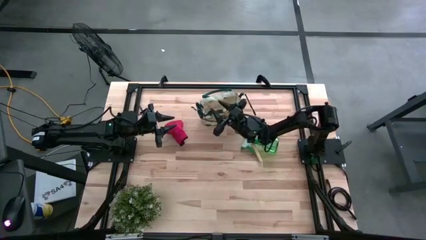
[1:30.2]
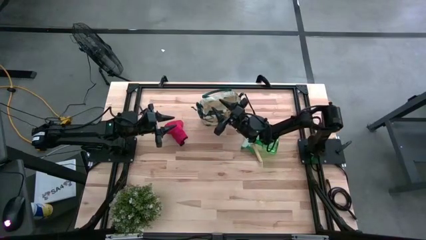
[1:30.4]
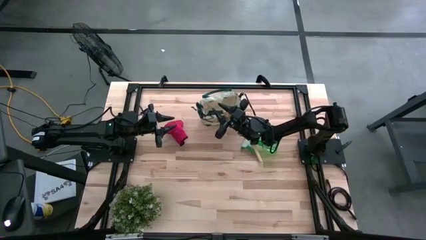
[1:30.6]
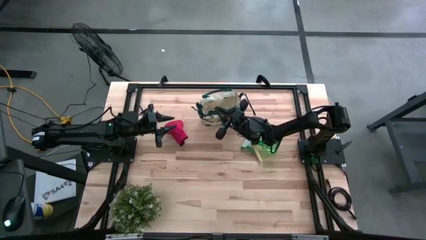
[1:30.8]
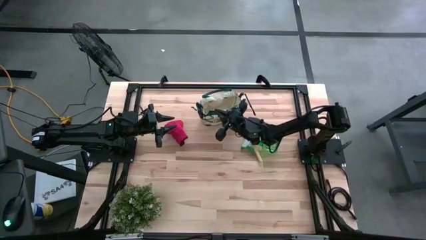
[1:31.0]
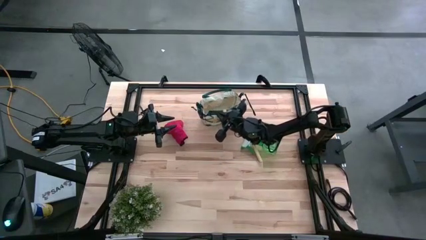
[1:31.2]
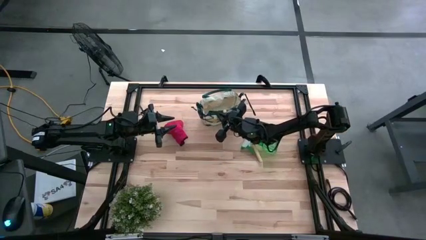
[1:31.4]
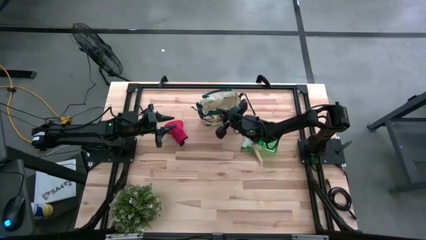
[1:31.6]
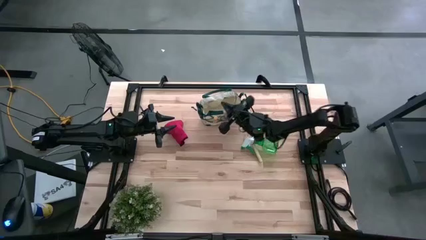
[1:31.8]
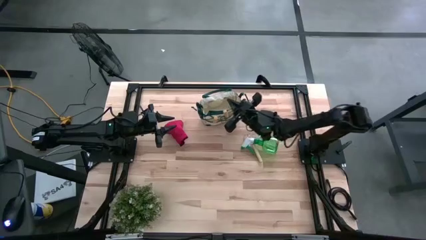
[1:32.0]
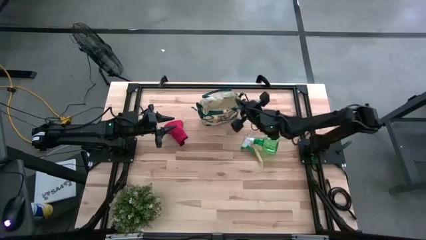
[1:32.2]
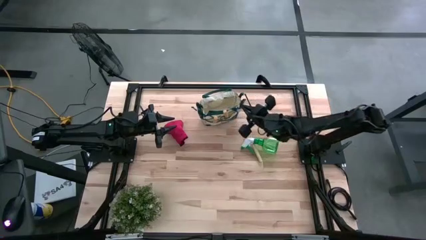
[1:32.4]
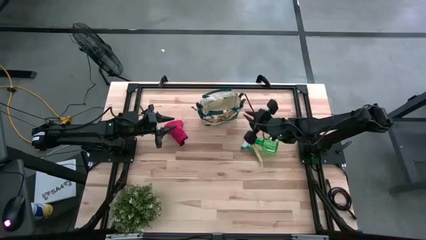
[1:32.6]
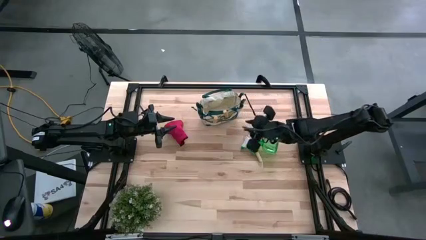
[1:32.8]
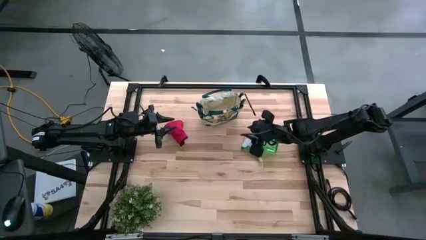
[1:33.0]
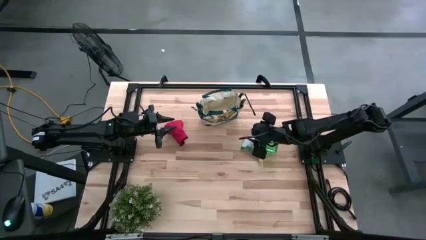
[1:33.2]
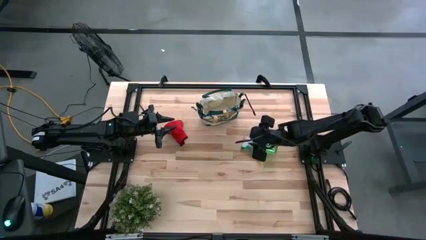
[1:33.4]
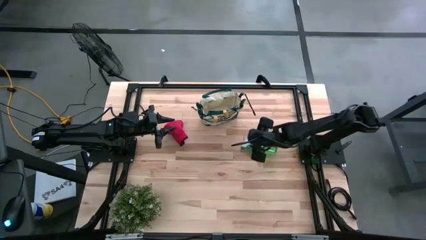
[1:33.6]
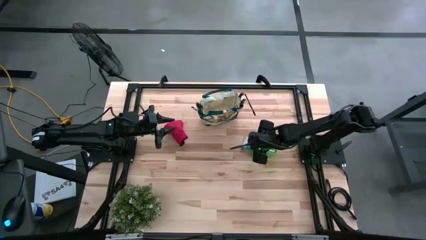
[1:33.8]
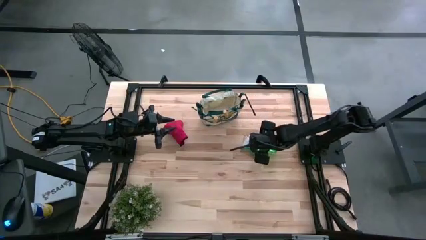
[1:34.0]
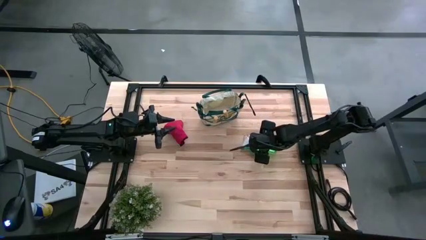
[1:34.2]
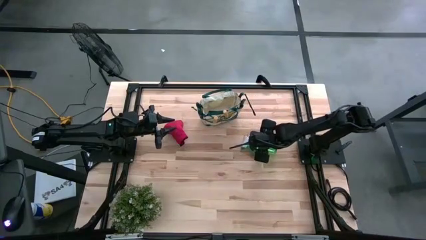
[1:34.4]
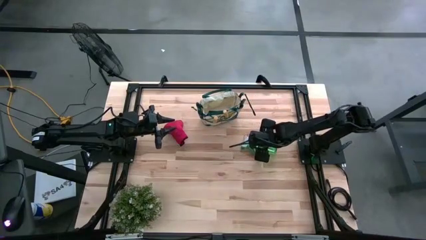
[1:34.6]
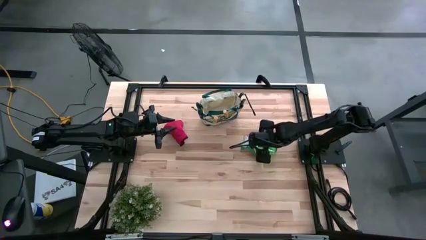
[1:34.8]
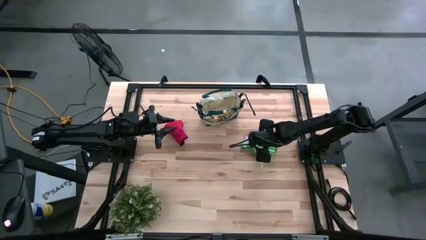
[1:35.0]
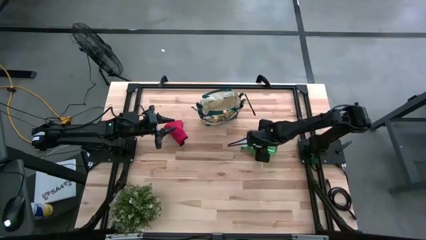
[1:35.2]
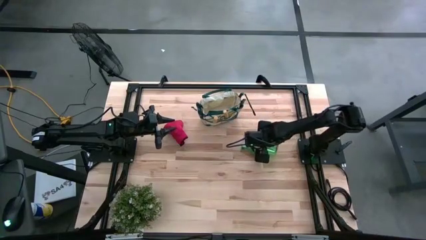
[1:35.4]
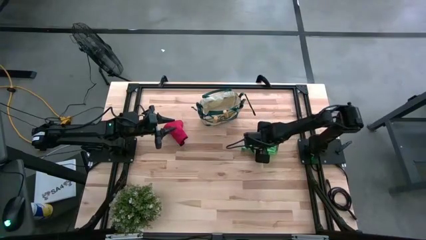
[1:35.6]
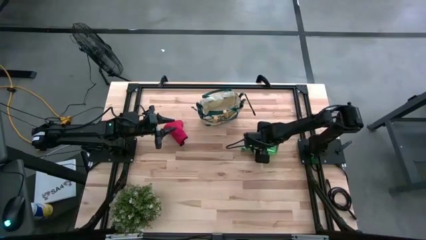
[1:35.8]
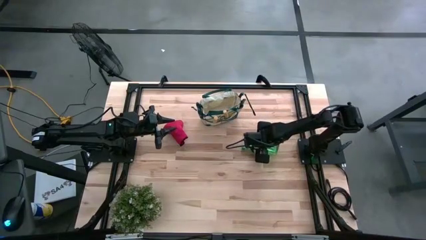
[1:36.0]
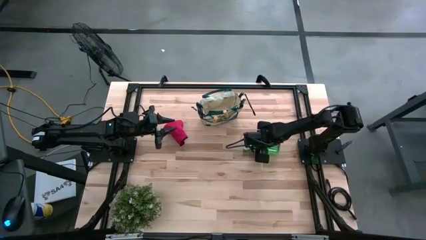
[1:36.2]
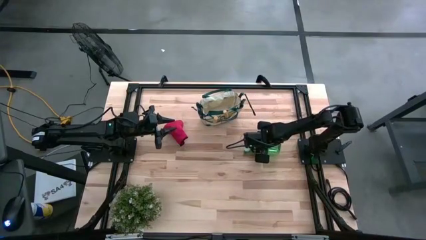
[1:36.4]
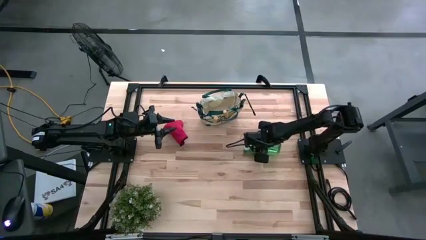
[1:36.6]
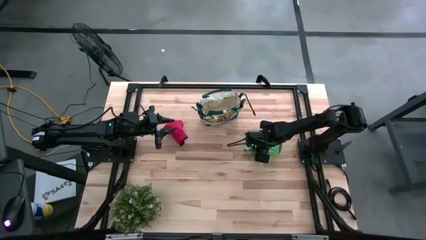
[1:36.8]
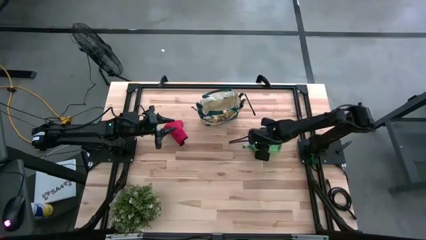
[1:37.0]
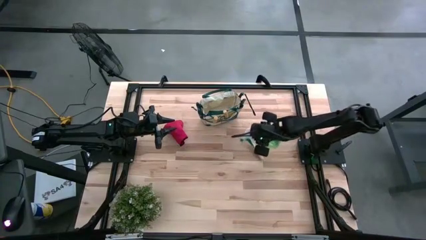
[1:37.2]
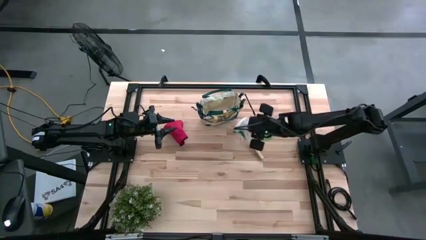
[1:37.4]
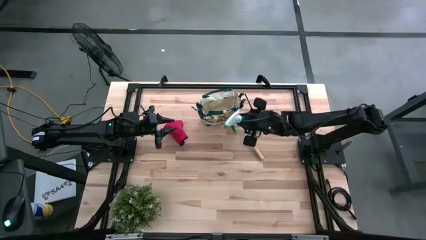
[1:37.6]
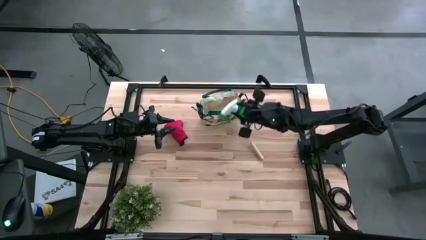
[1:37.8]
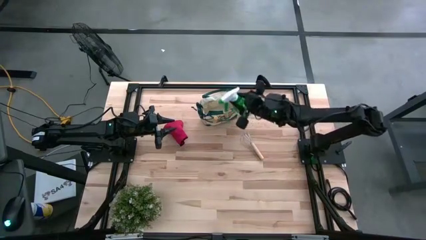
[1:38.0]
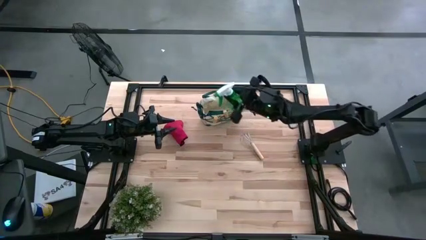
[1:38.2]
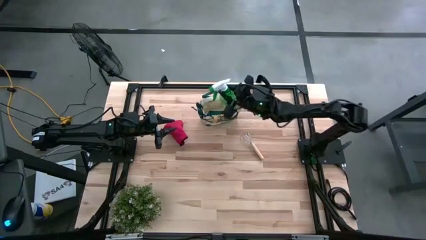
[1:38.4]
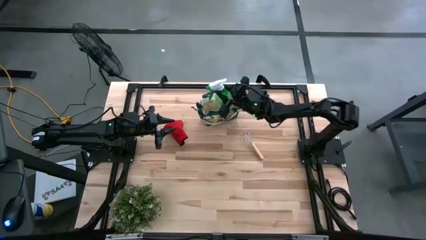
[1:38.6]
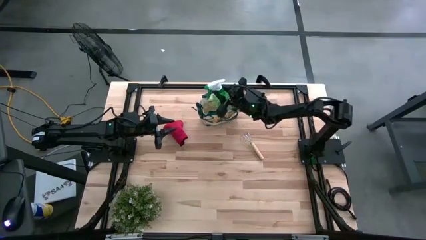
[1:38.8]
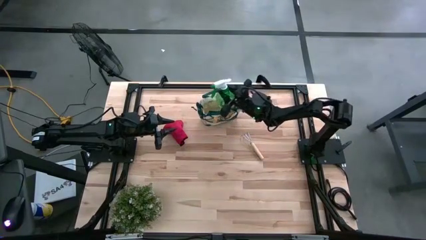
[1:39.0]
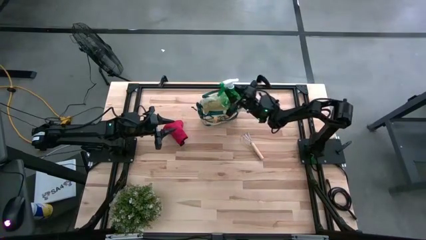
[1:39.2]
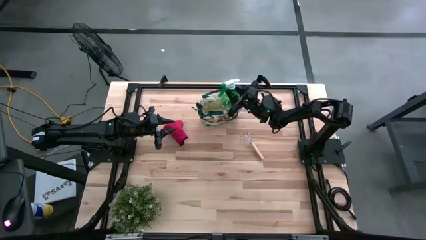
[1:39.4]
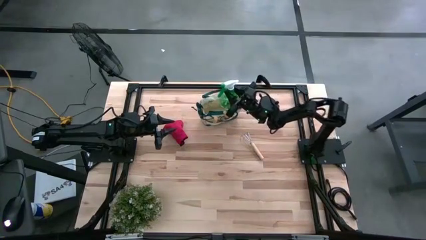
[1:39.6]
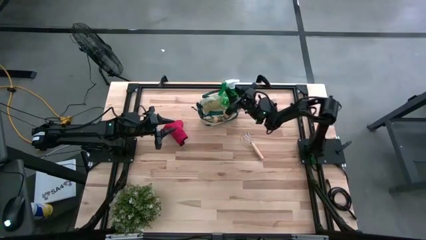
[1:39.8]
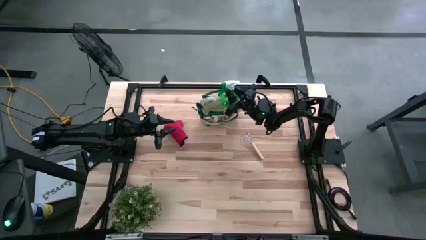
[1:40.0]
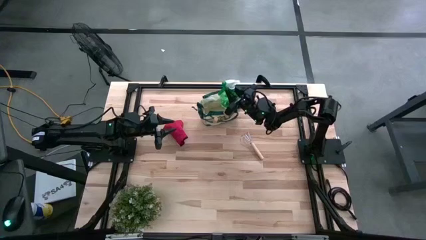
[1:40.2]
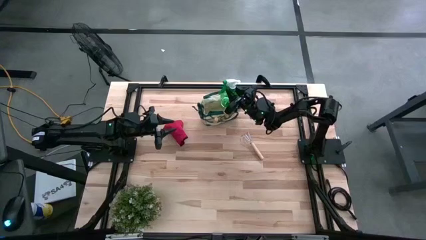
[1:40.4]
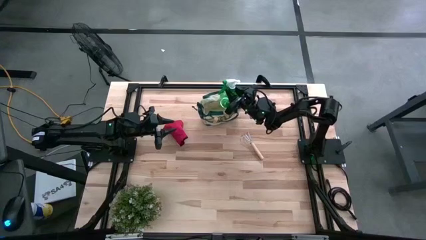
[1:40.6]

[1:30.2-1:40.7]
Task: Pick & Place Garden tools in Gardening bag
Put the green spray bottle into the gardening bag

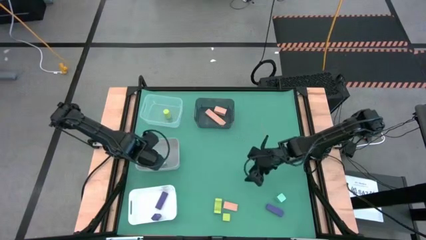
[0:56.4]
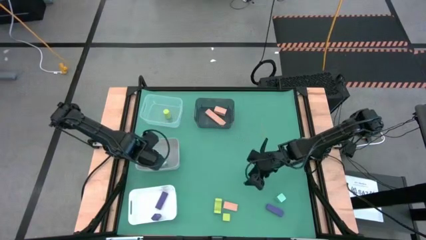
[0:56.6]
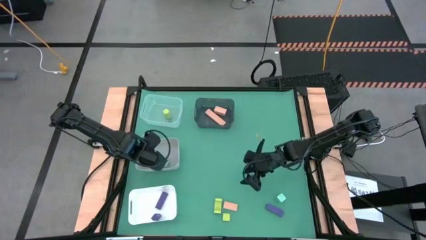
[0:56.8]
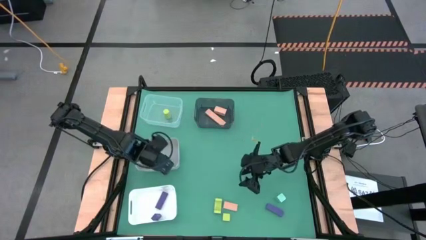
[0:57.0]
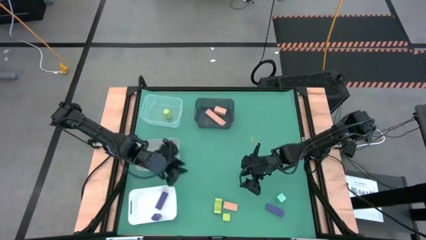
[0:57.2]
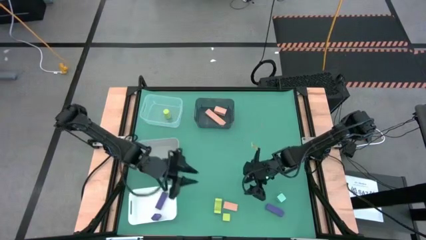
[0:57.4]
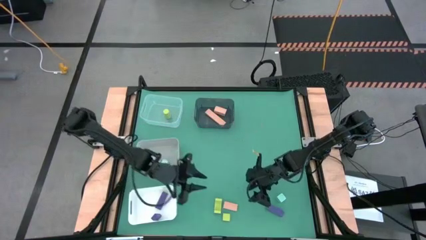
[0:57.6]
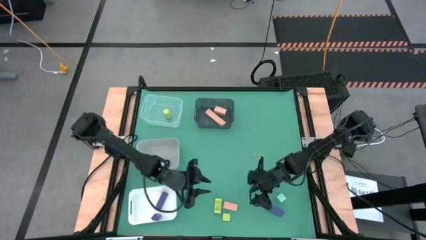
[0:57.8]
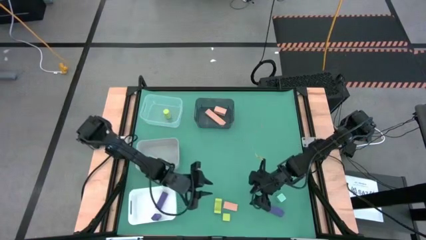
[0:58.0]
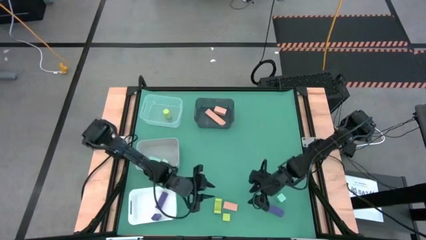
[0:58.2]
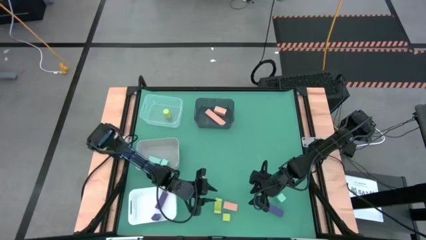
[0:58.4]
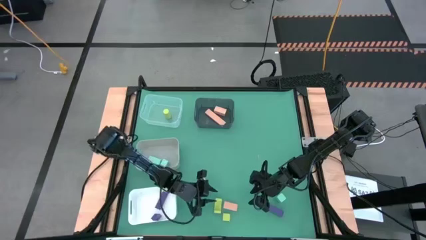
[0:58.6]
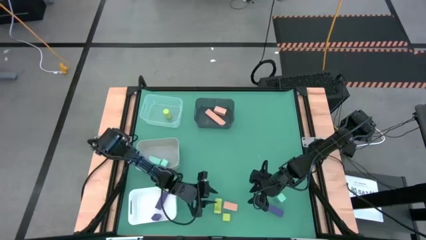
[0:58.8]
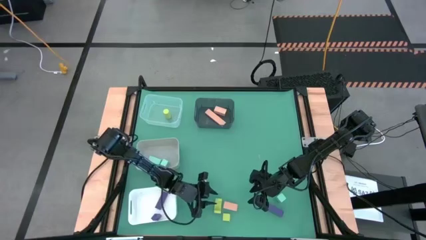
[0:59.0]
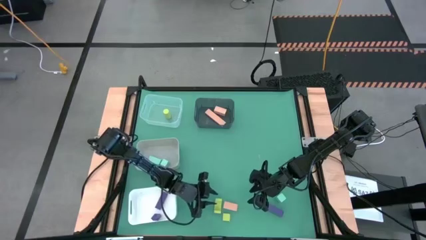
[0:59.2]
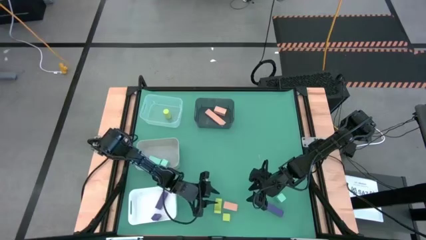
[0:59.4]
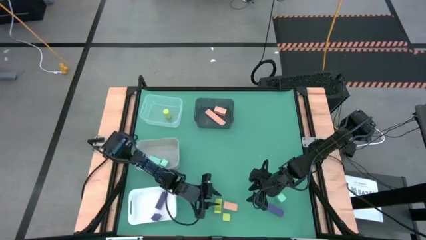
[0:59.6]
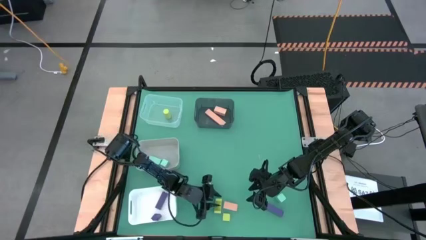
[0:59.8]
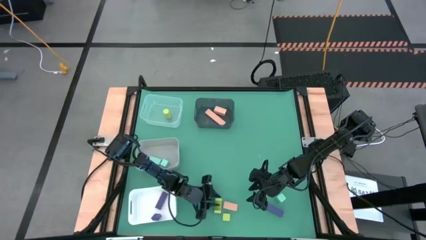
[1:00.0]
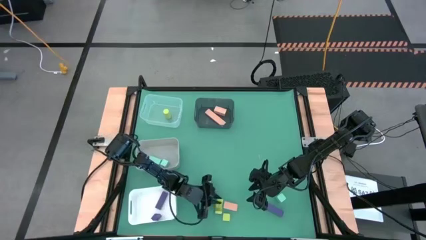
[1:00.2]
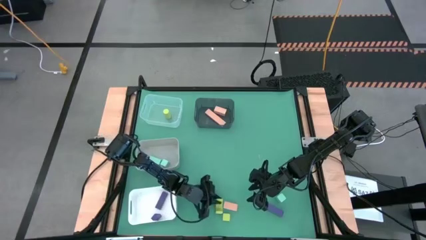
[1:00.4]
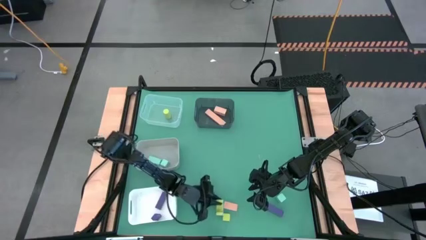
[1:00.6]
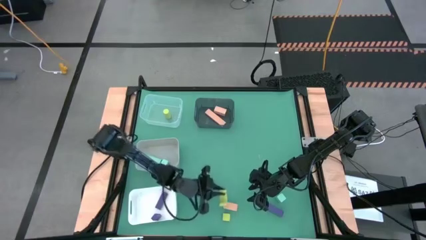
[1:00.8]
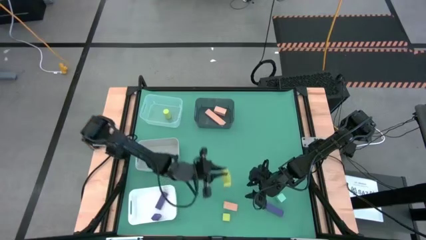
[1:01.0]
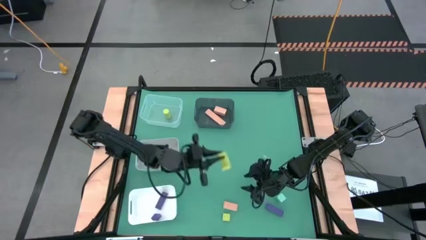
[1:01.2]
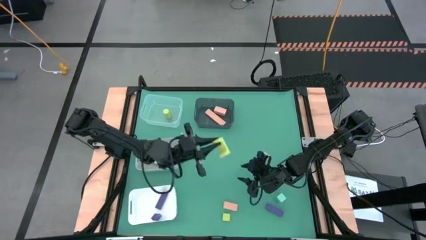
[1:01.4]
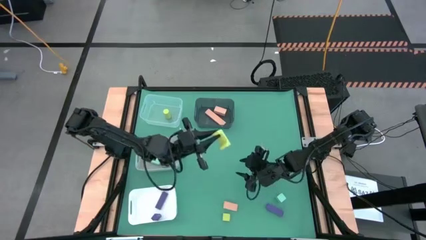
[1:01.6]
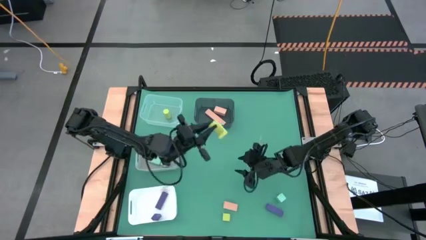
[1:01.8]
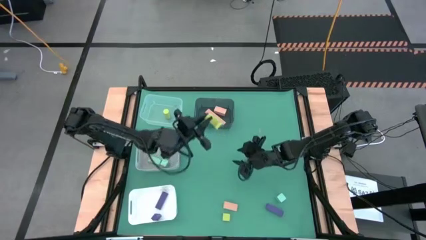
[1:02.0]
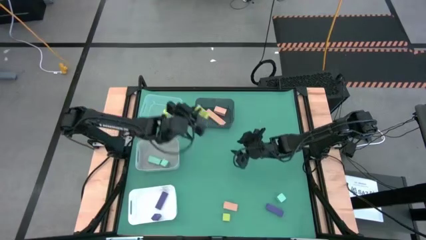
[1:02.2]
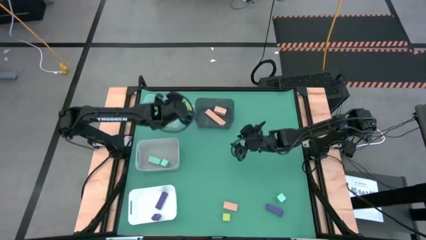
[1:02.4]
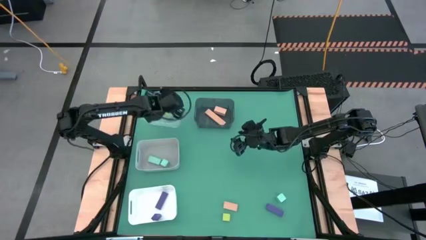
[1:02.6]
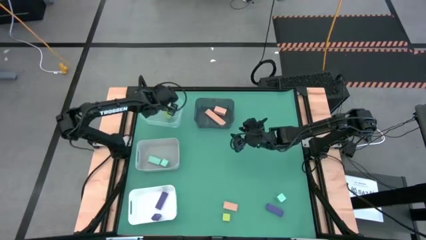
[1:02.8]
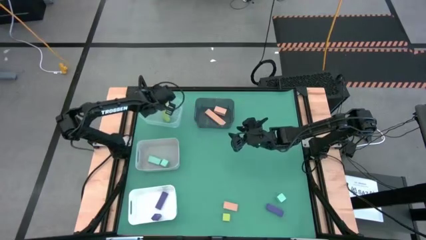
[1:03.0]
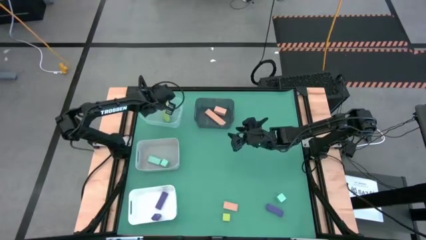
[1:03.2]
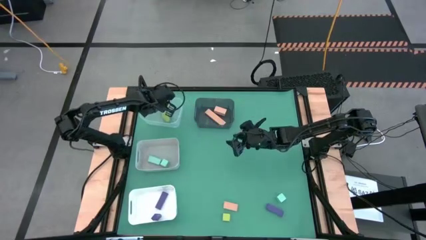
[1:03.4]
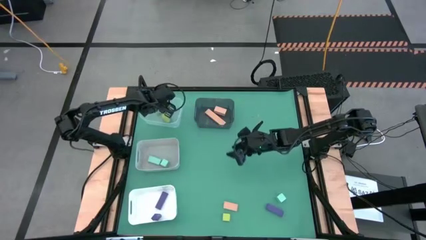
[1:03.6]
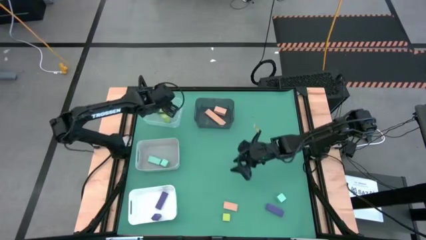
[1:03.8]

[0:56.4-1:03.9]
Task: Sort & place blocks by color
Put the left green block into the transparent bin
